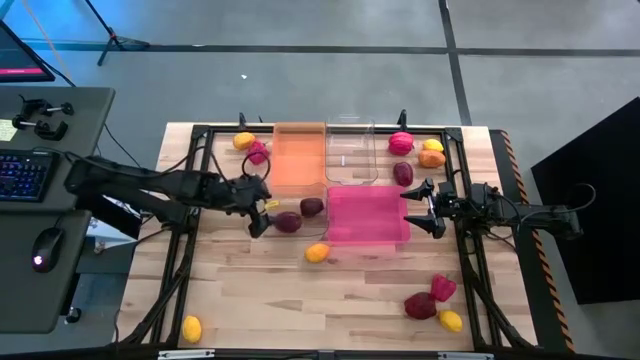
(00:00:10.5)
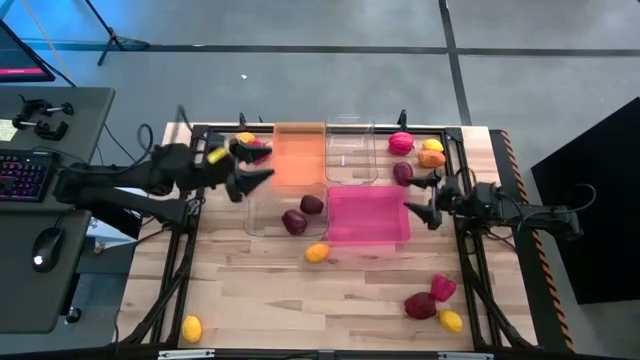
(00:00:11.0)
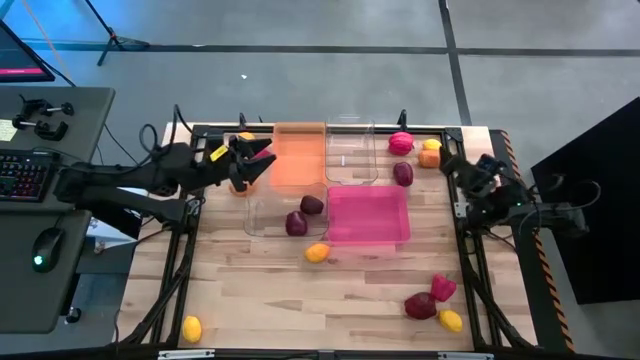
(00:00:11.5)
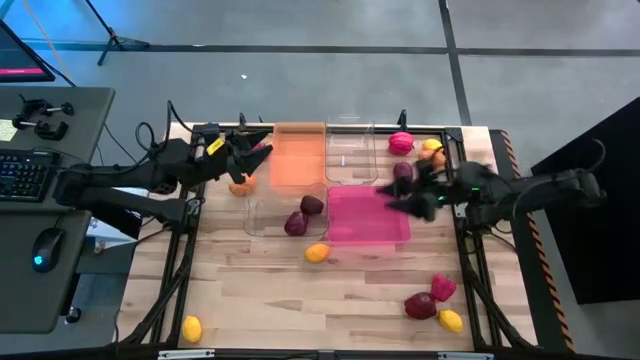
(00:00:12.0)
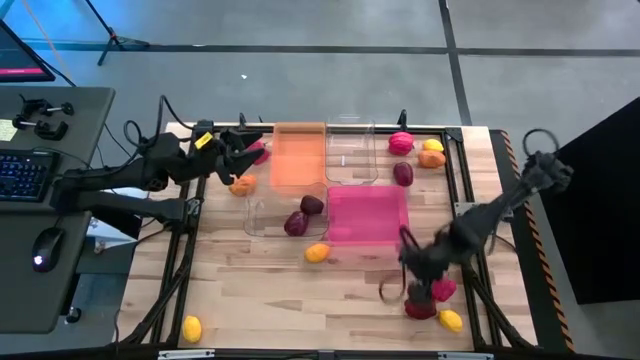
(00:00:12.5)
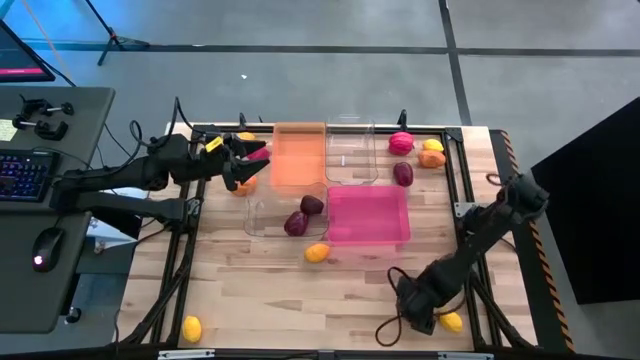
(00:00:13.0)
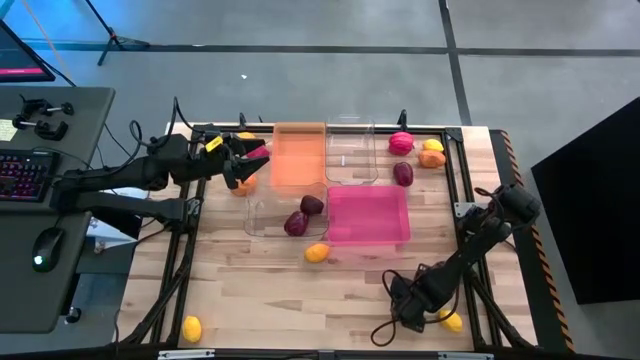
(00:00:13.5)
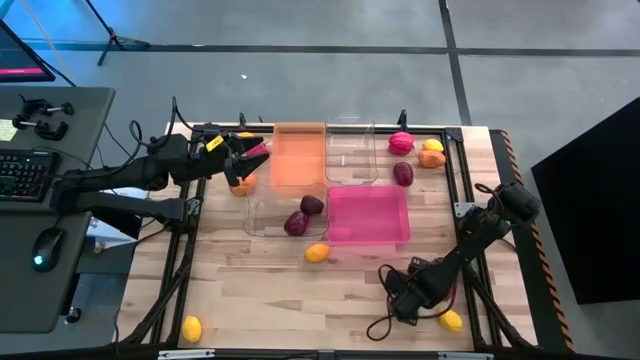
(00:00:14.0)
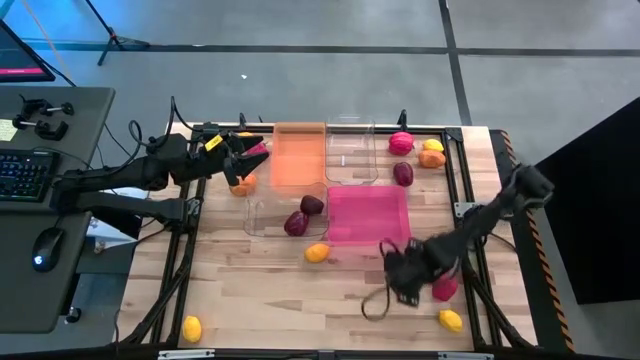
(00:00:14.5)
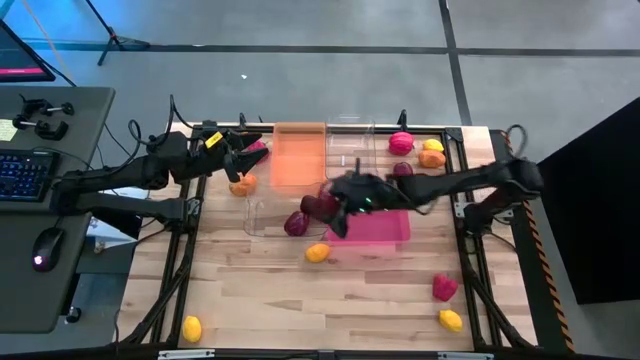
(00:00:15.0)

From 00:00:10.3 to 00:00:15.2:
Task: Sort produce into baskets
Put the apple into the bottom transparent bin

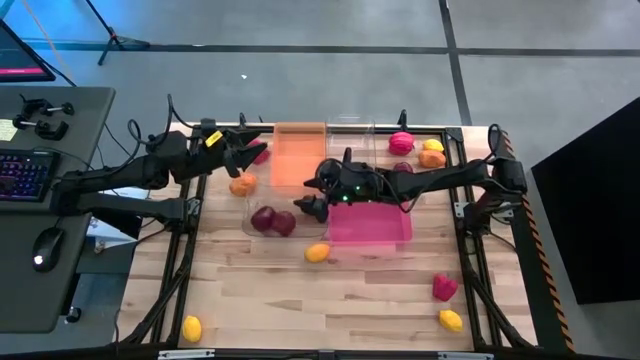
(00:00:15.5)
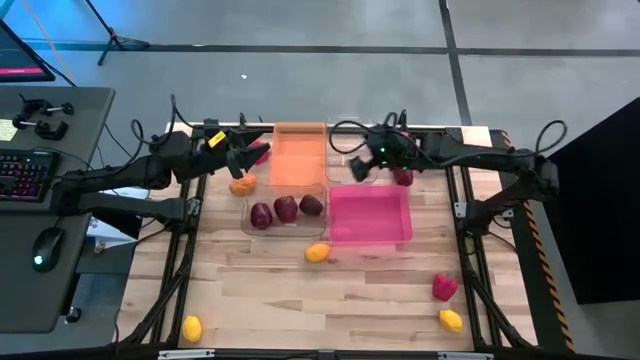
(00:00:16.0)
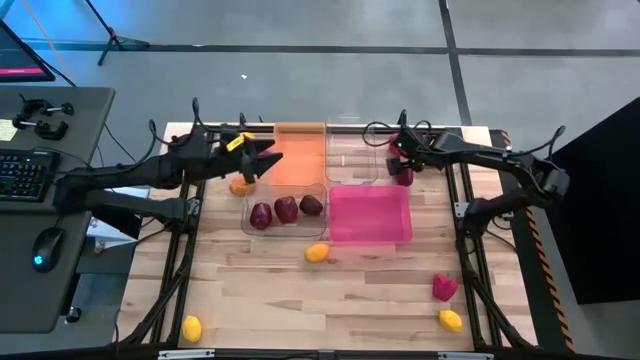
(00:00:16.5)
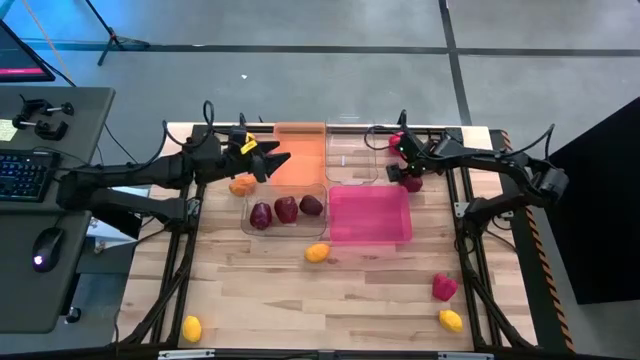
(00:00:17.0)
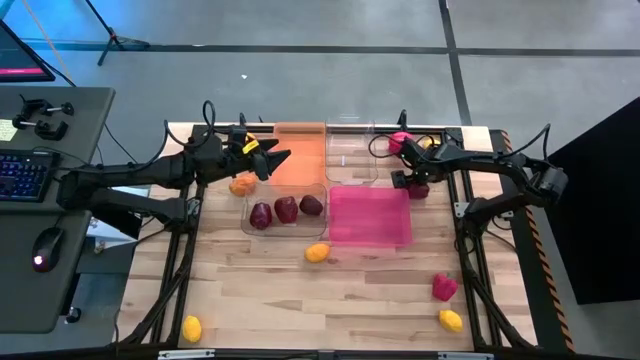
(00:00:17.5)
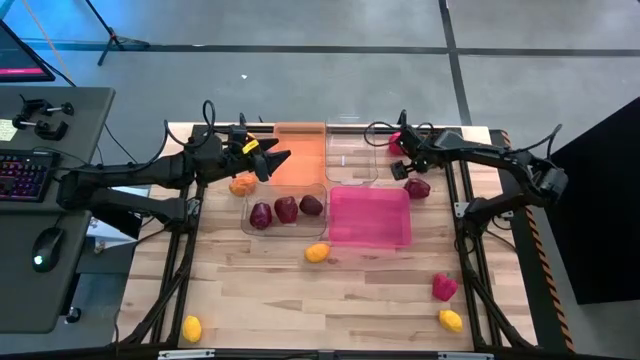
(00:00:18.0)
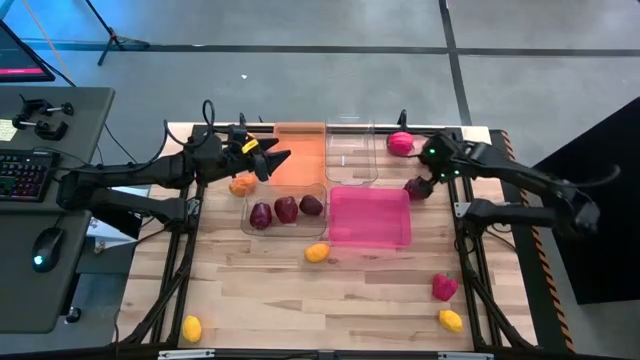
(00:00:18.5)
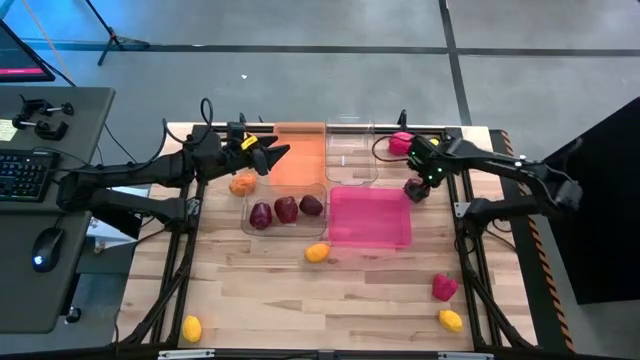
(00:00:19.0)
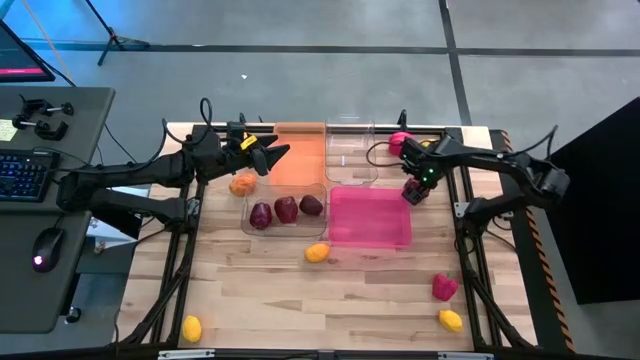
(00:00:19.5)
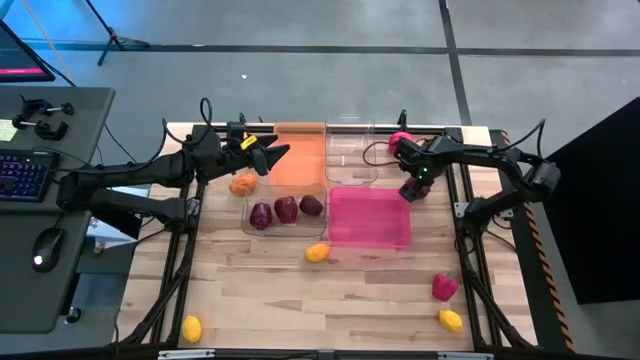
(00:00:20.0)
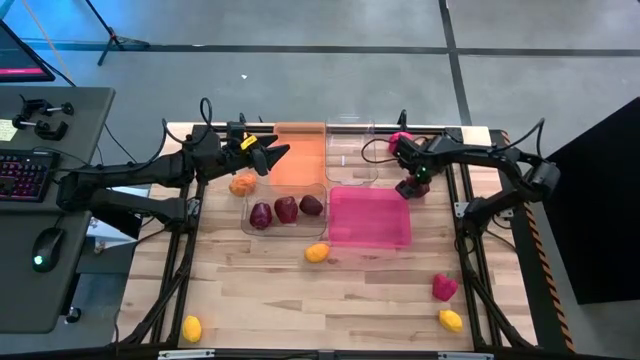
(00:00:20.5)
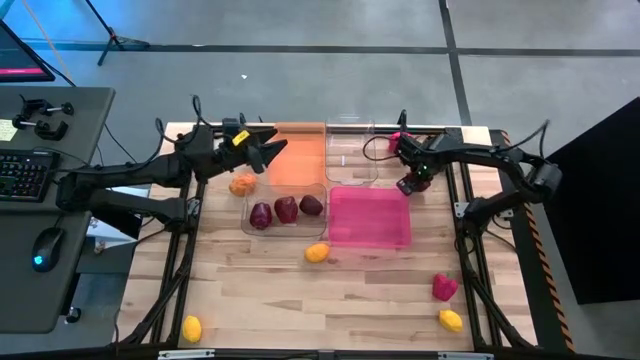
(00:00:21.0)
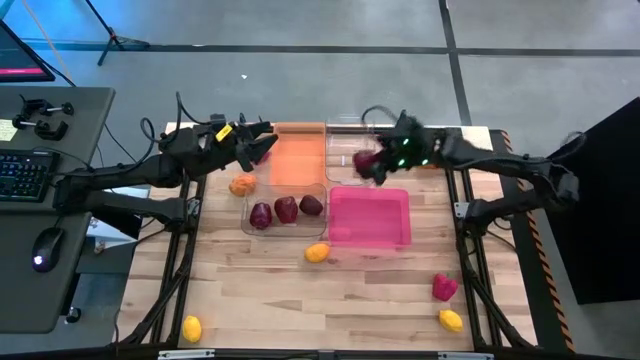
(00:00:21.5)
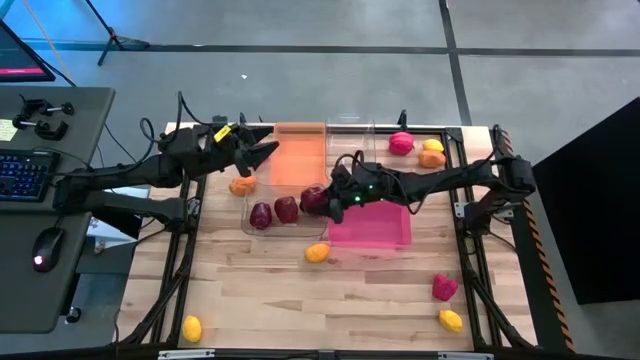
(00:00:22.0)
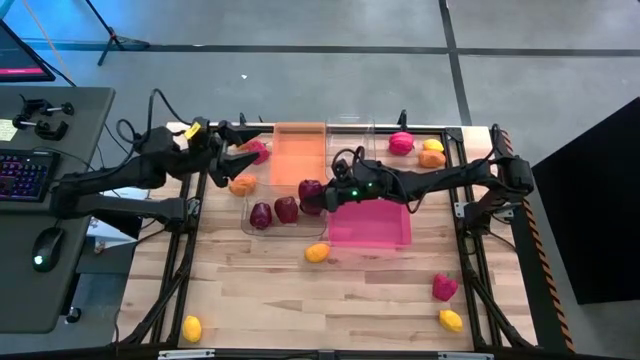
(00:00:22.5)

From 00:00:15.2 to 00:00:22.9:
Put the apple into the bottom transparent bin

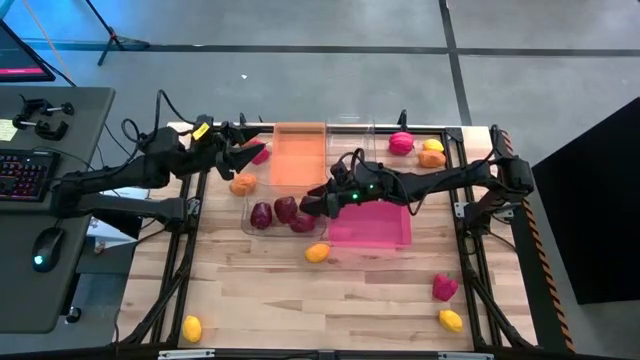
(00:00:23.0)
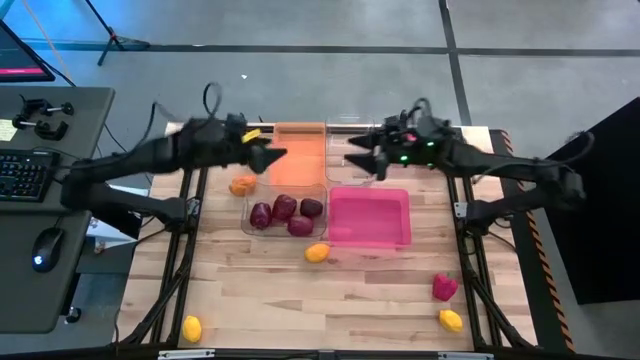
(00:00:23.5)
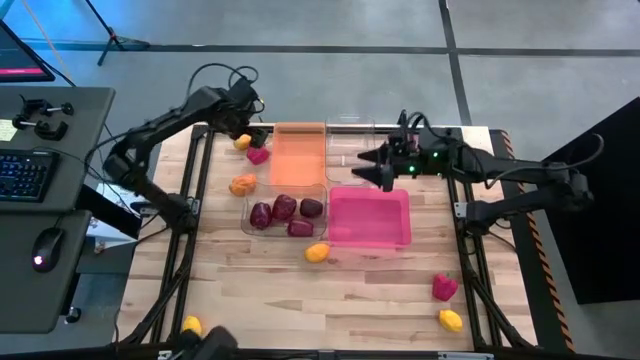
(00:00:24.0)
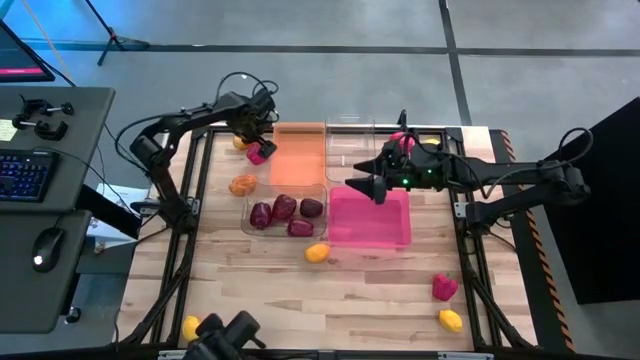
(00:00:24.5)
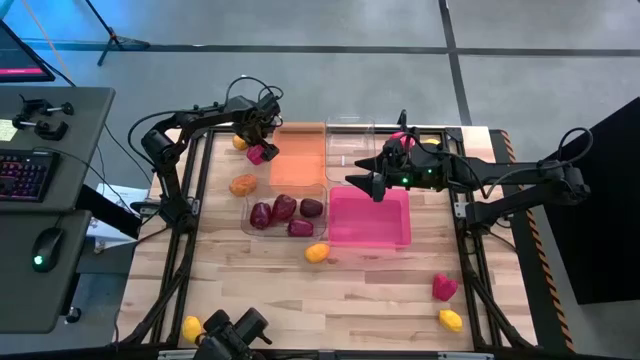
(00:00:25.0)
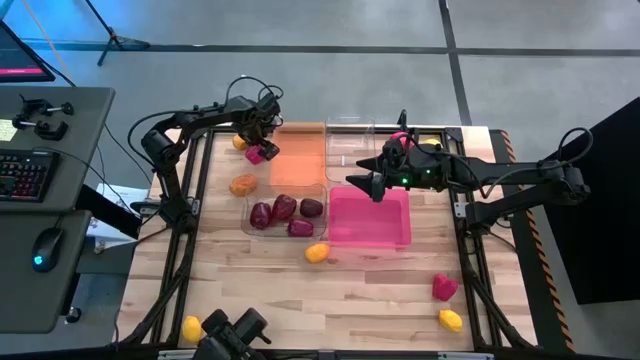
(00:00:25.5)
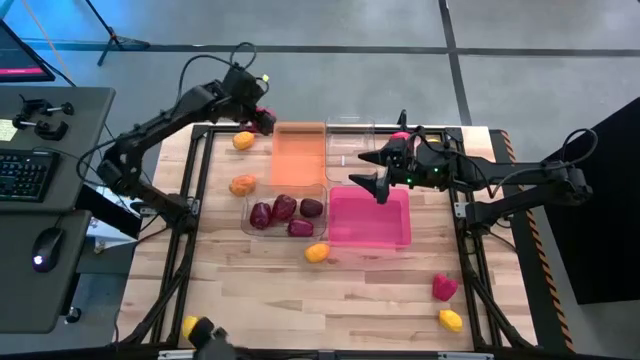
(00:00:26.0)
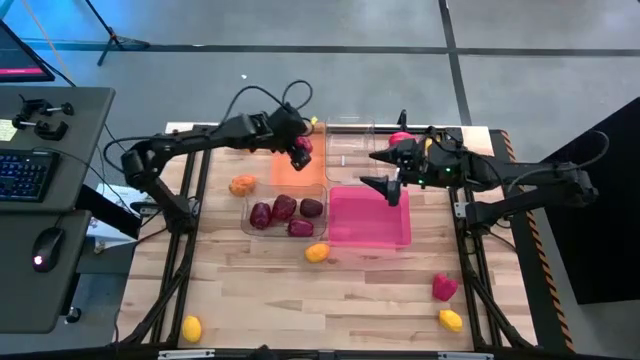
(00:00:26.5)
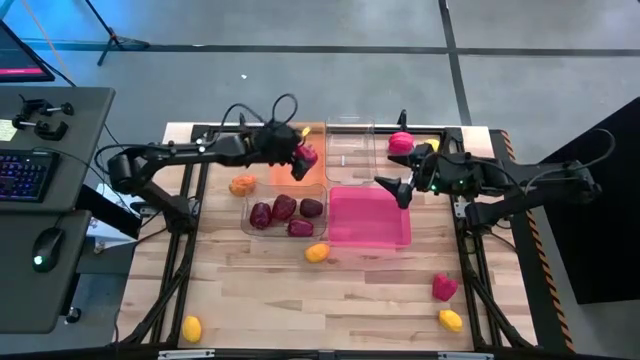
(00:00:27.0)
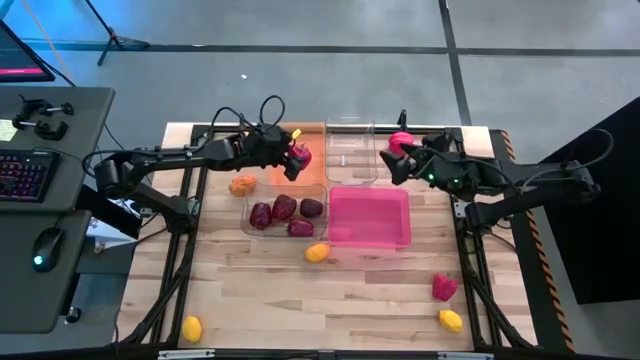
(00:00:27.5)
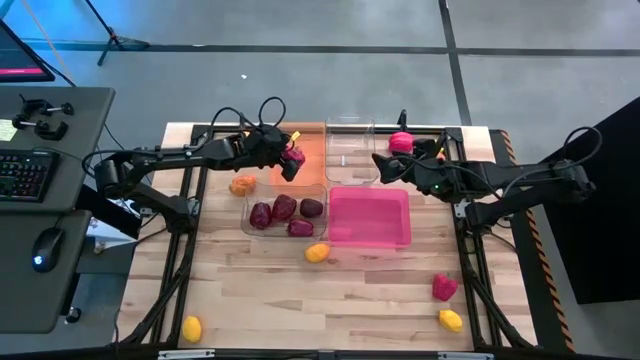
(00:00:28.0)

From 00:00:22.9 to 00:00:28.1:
Put the bell pepper into the orange bin

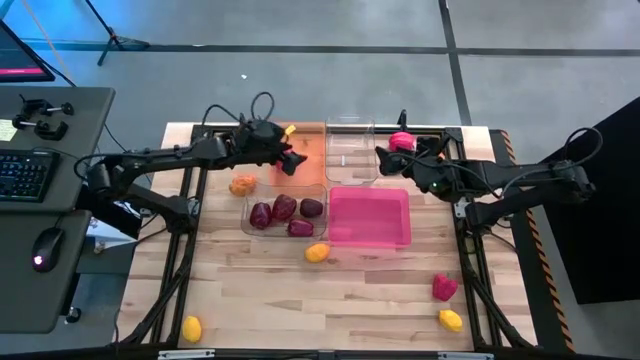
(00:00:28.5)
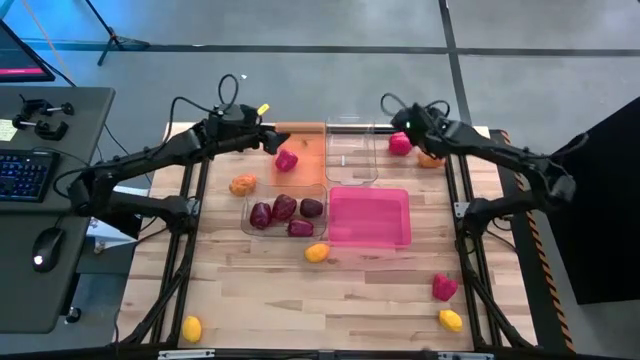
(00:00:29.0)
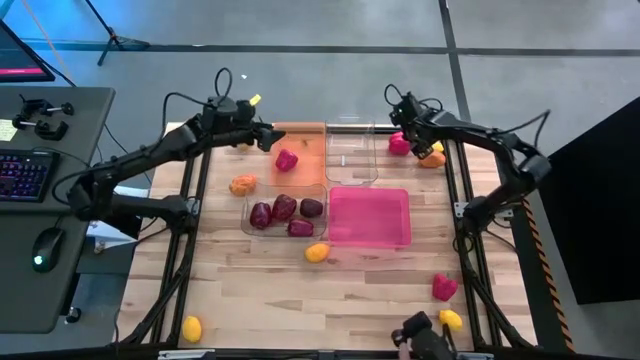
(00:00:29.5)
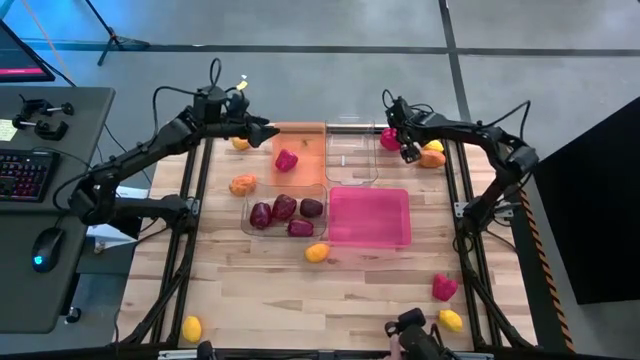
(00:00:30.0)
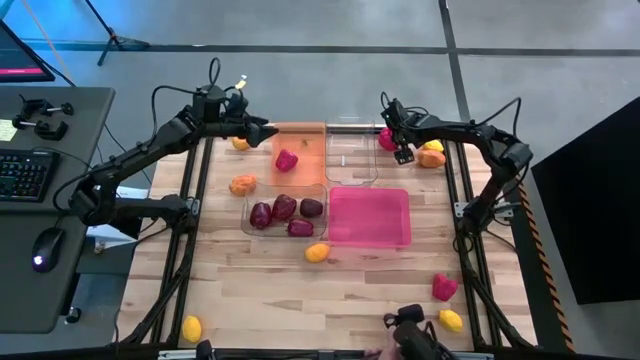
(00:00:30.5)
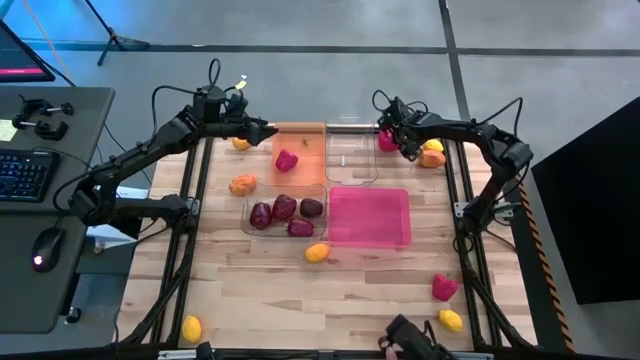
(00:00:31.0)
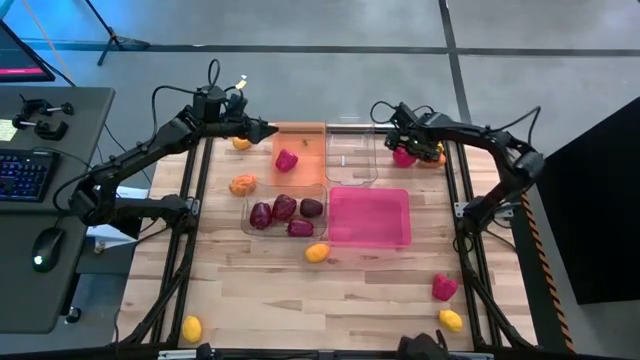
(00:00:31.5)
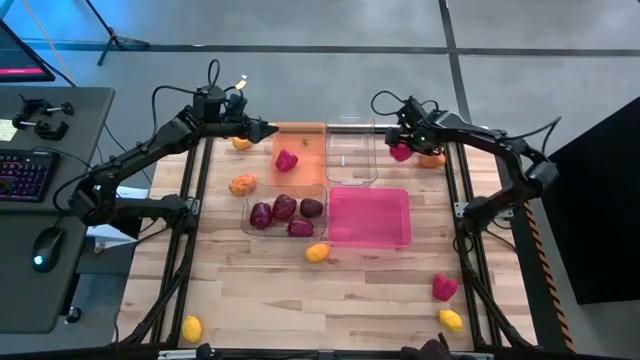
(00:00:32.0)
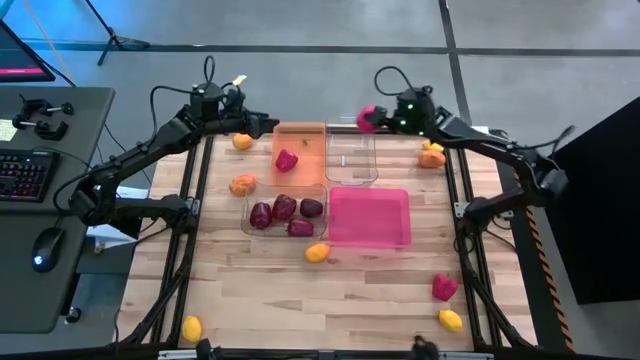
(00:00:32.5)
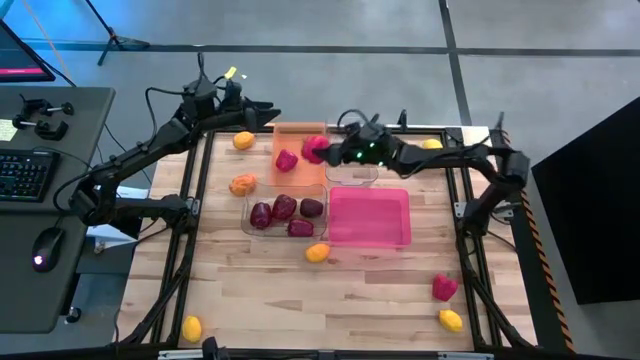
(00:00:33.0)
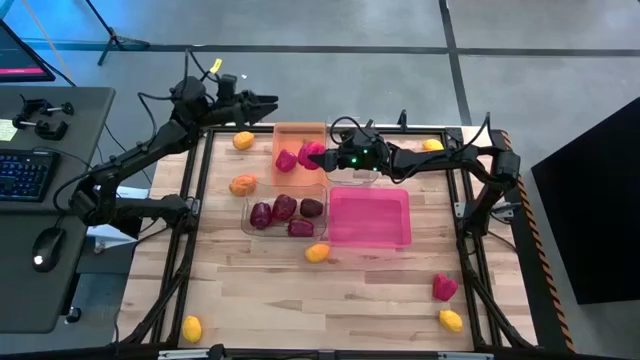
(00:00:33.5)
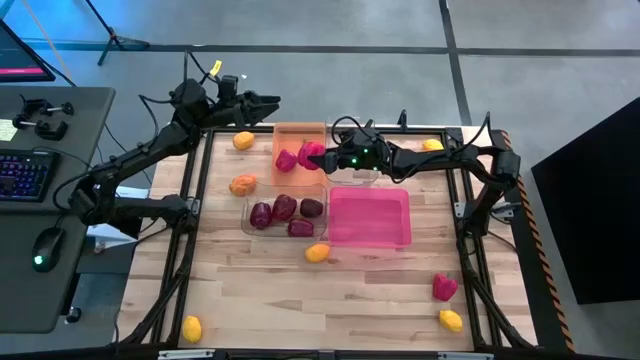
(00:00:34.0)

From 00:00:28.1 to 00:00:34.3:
Put the bell pepper into the orange bin
